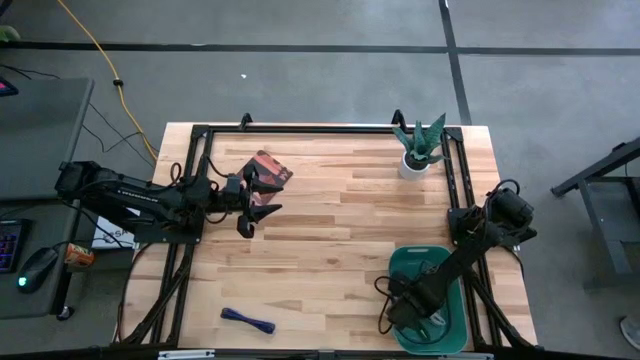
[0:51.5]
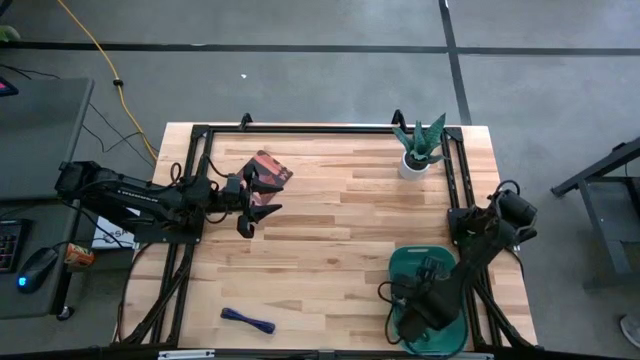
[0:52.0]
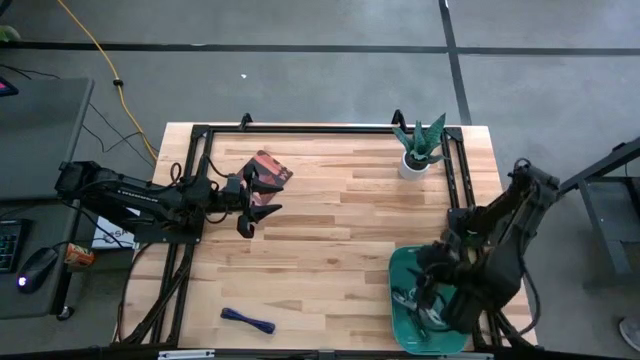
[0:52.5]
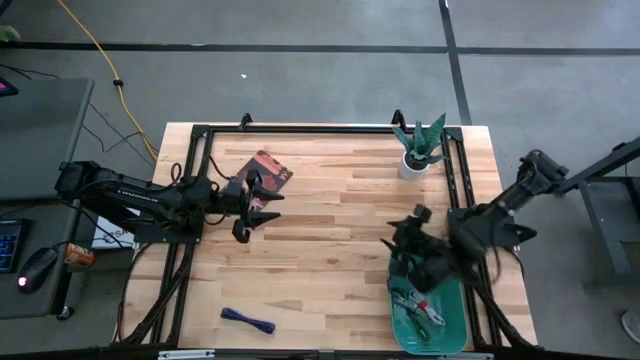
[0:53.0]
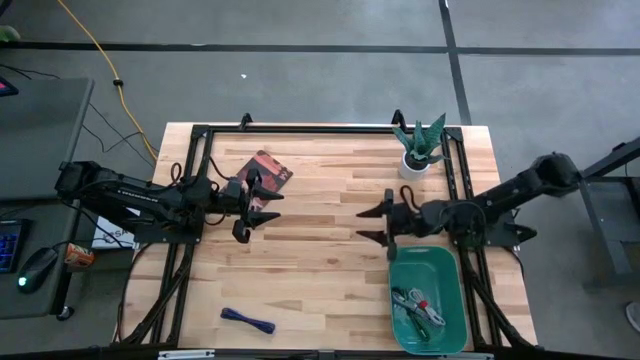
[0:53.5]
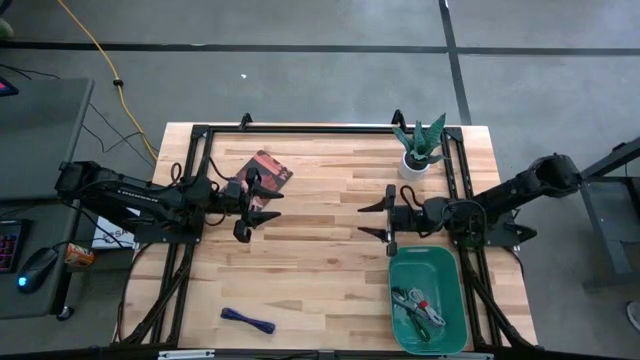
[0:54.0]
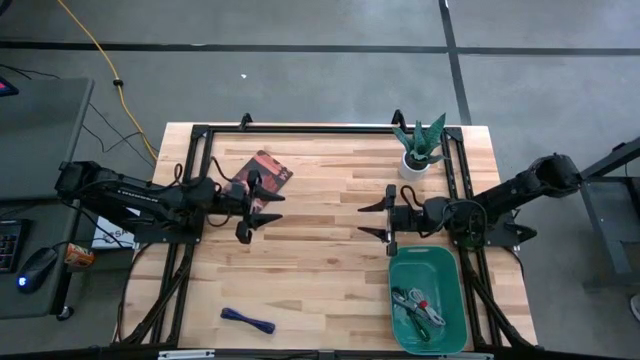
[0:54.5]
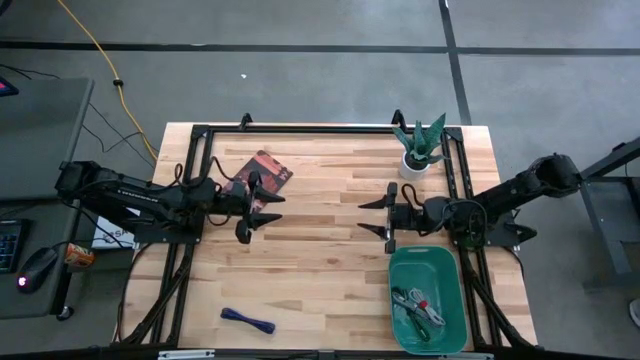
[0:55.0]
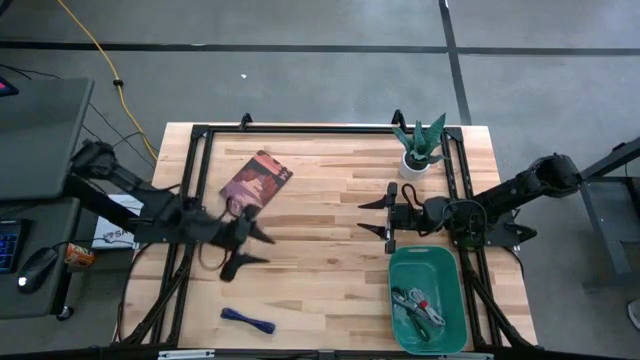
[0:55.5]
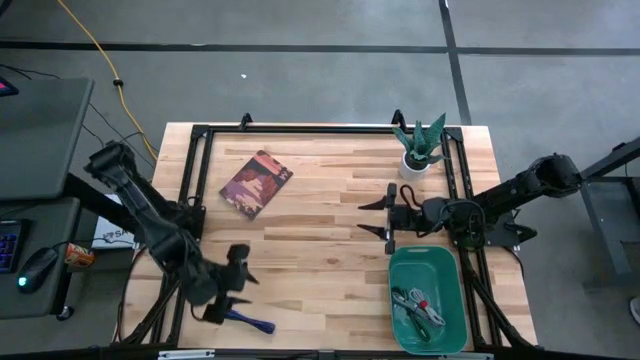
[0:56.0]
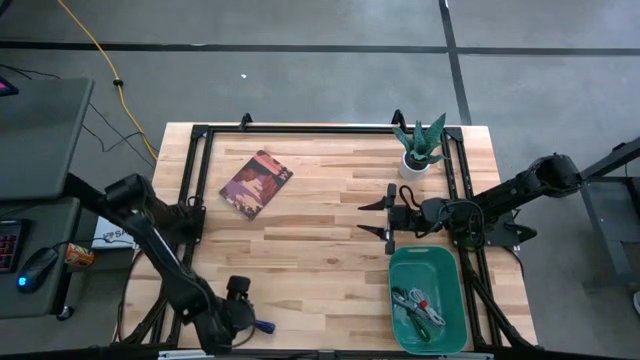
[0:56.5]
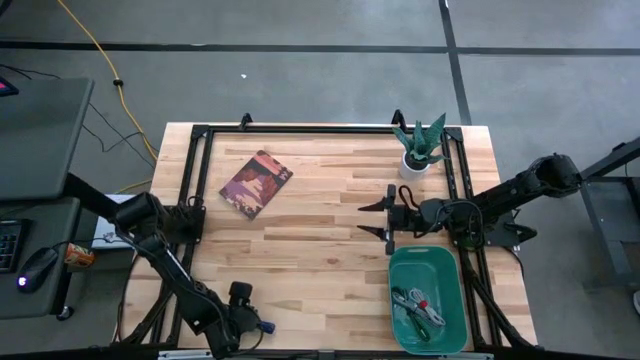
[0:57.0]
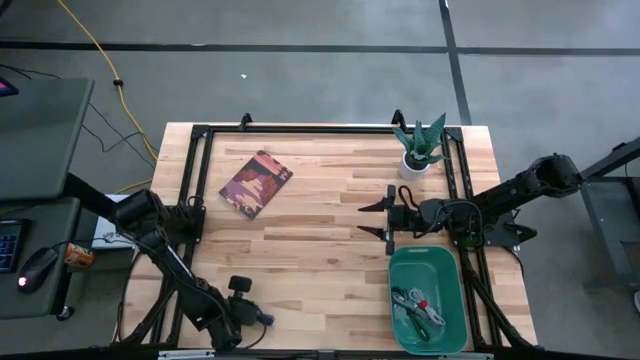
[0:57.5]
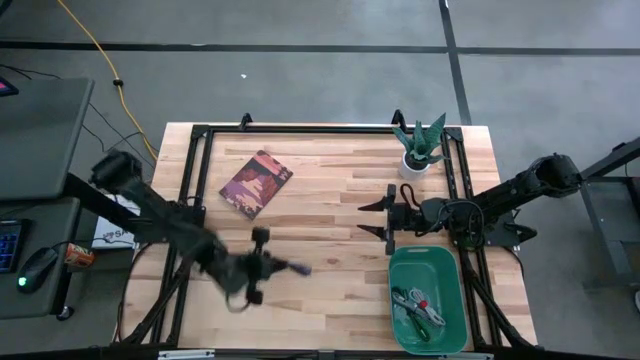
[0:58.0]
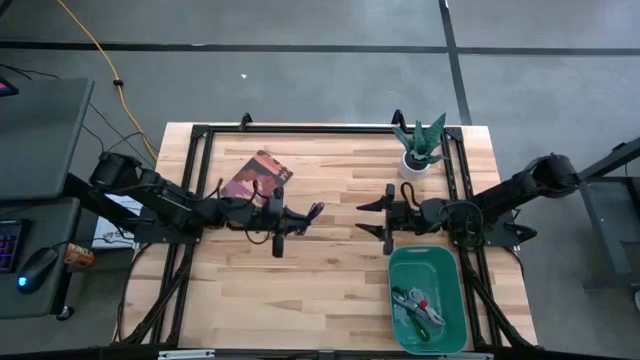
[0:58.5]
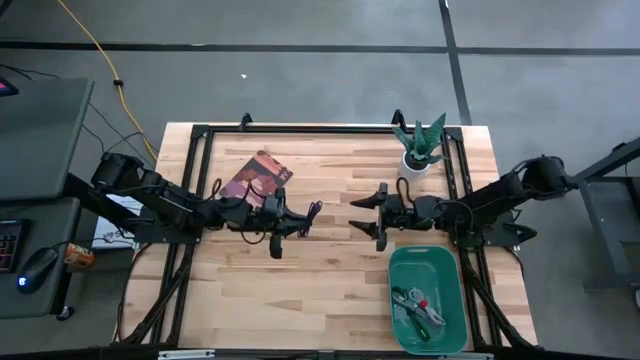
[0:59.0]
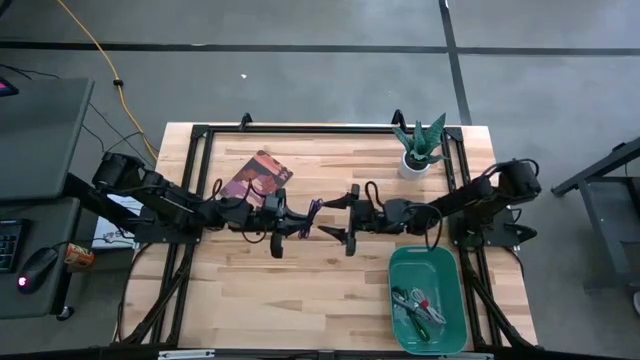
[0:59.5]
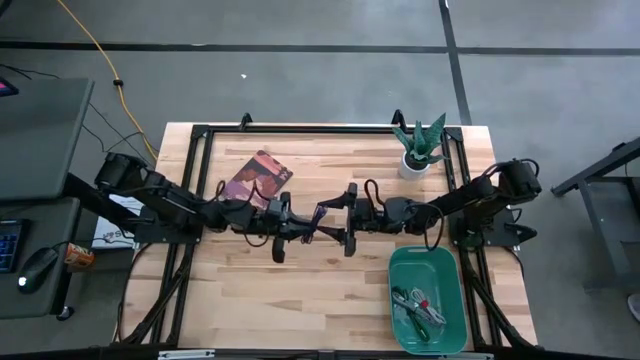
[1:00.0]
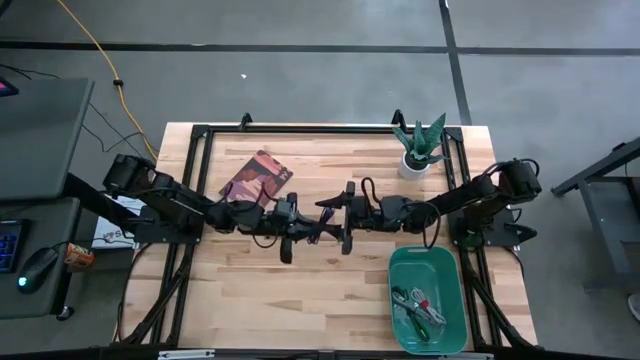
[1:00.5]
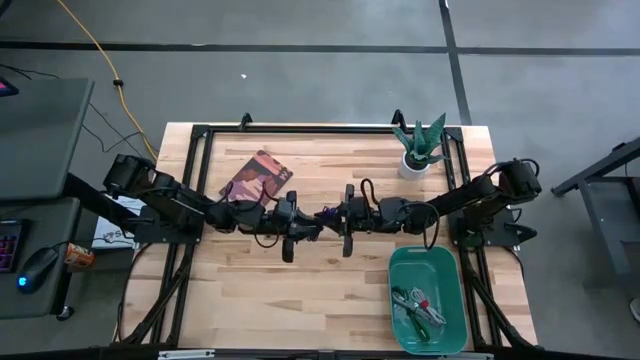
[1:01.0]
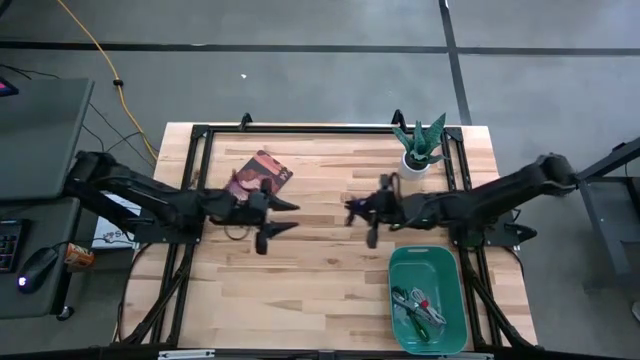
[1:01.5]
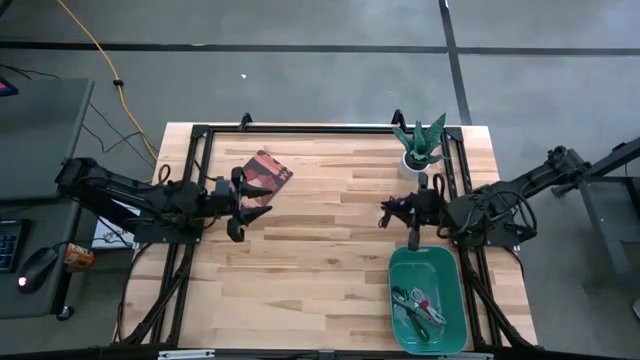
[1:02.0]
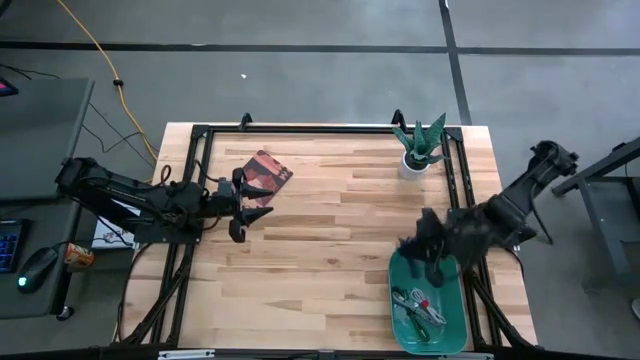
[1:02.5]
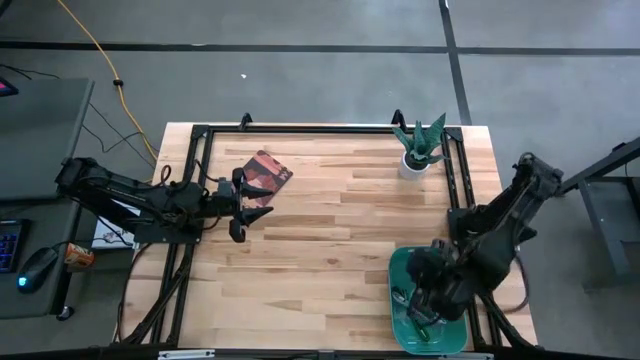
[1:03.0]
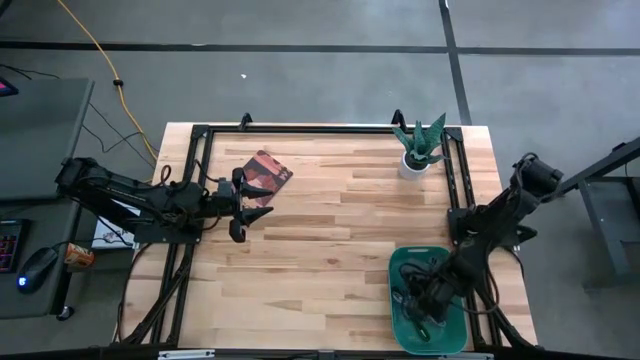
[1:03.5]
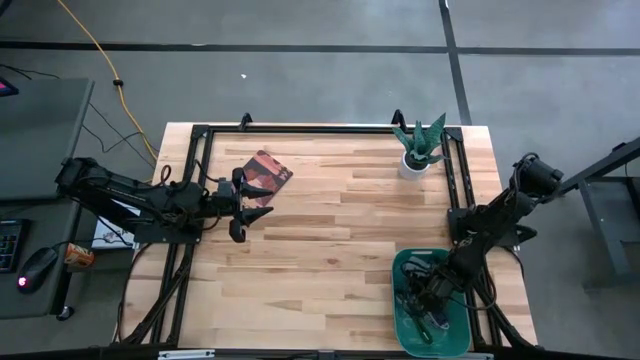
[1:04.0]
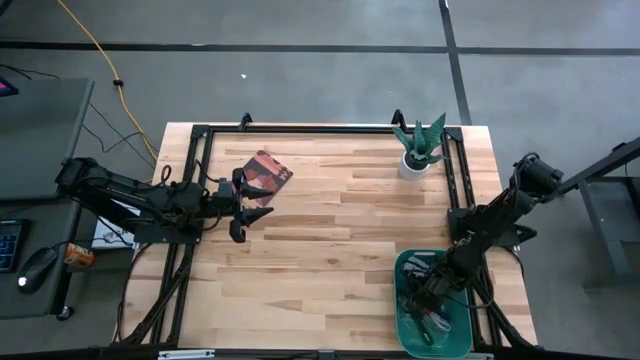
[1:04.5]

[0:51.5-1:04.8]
Task: Pick and place USB-C Cables
Put the black purple USB cable into the bin

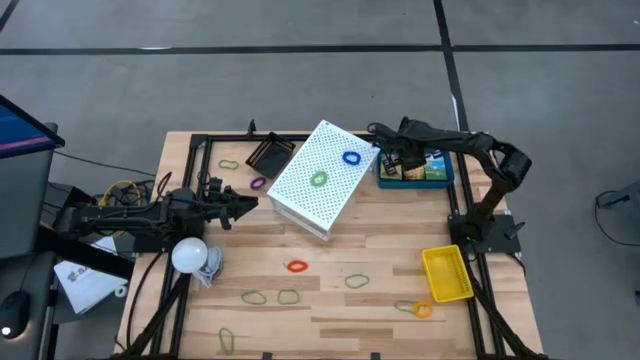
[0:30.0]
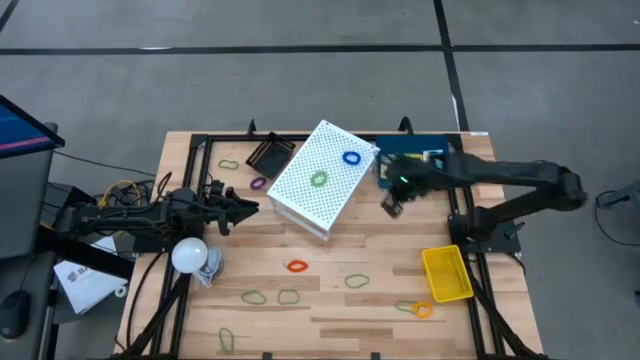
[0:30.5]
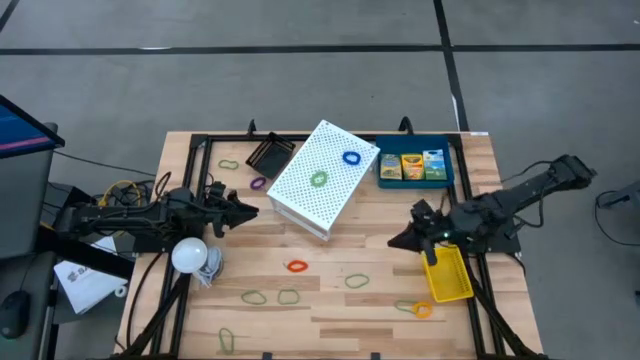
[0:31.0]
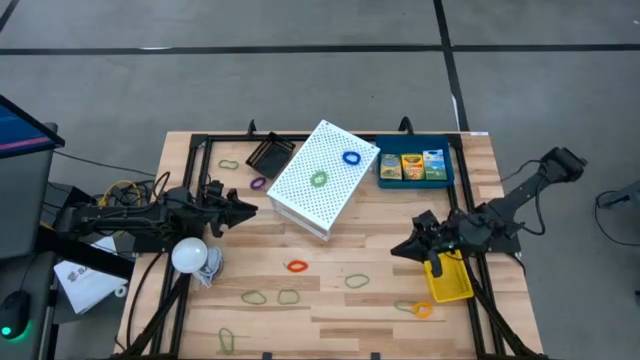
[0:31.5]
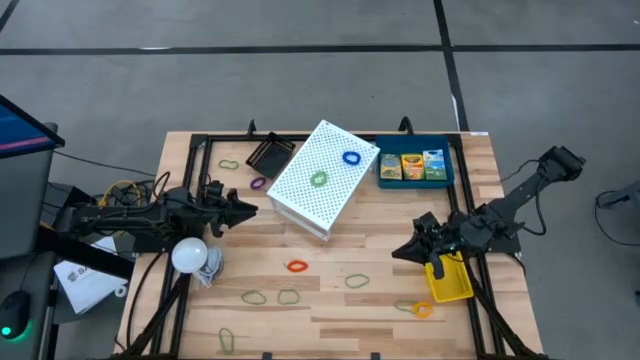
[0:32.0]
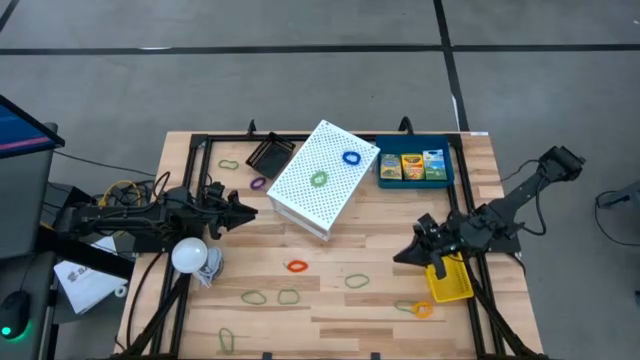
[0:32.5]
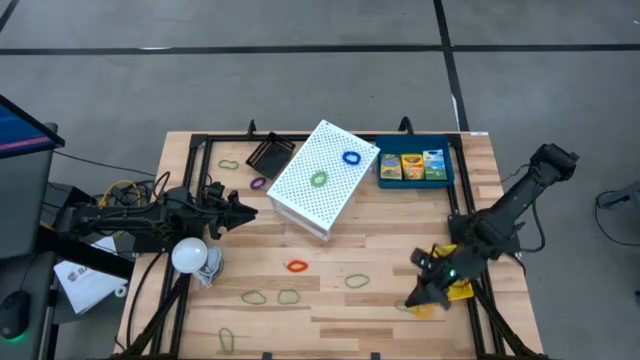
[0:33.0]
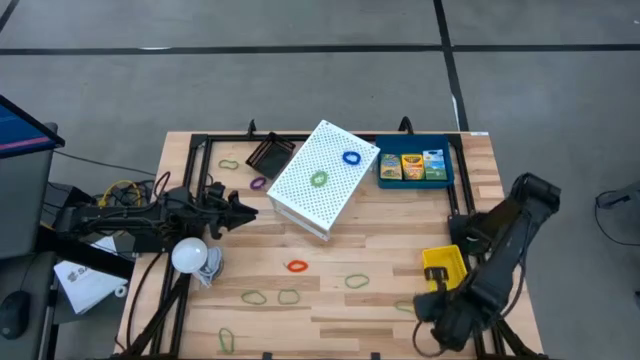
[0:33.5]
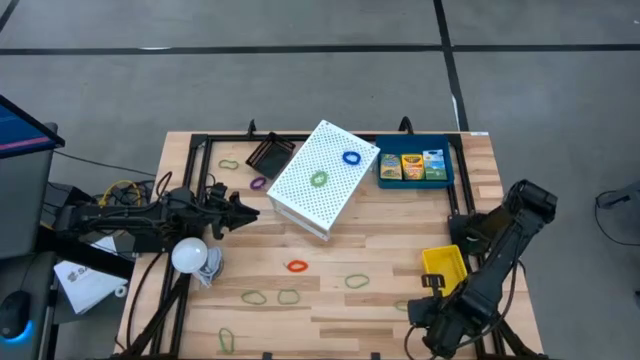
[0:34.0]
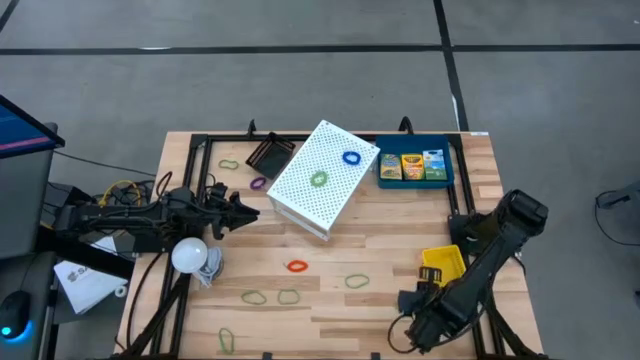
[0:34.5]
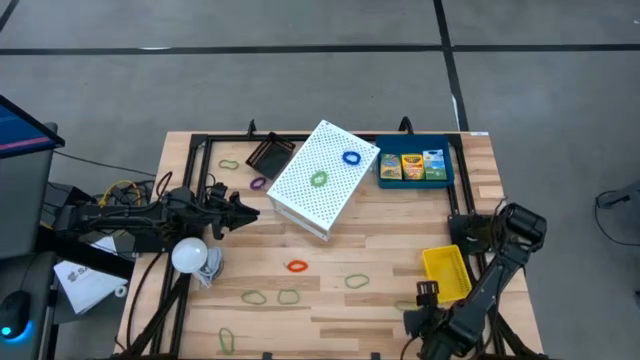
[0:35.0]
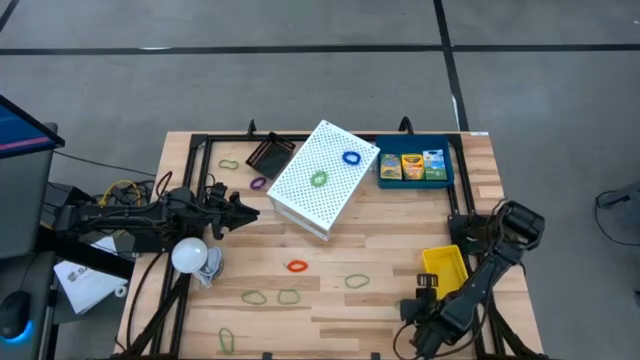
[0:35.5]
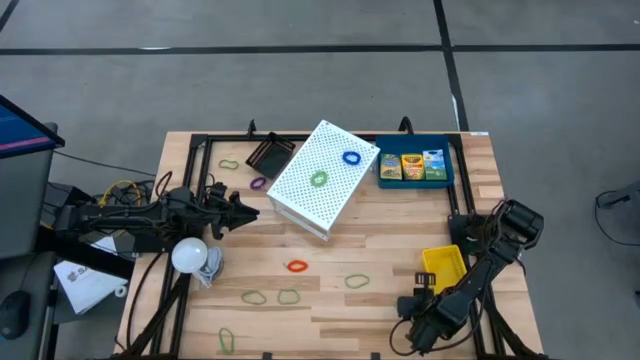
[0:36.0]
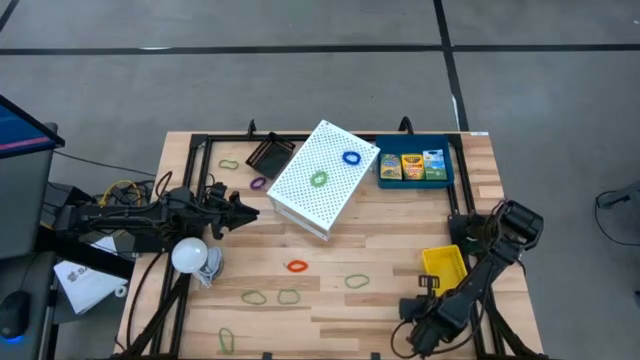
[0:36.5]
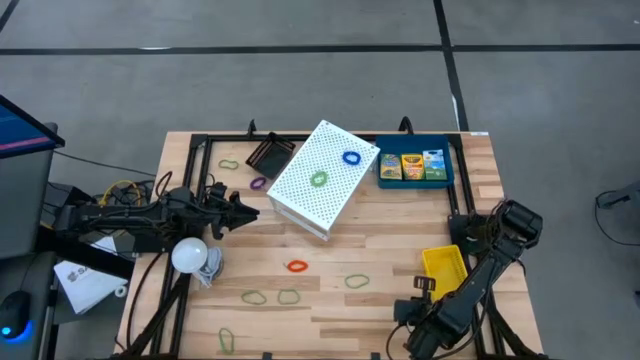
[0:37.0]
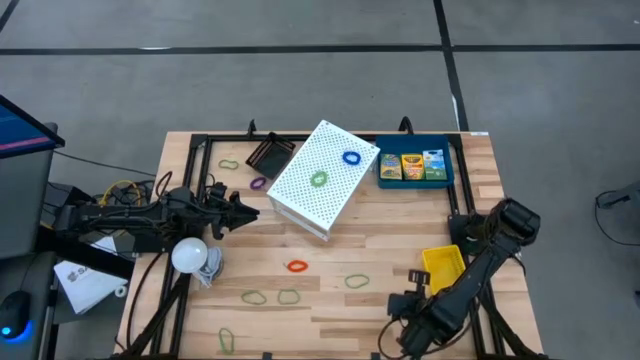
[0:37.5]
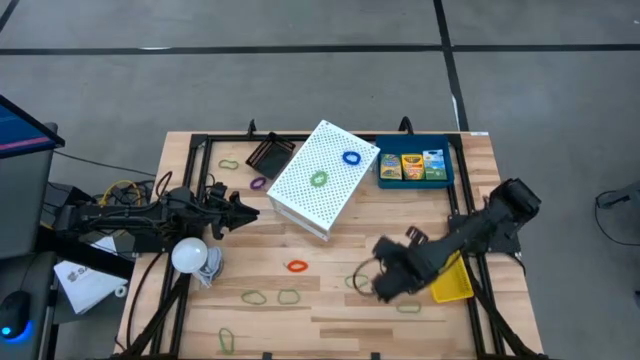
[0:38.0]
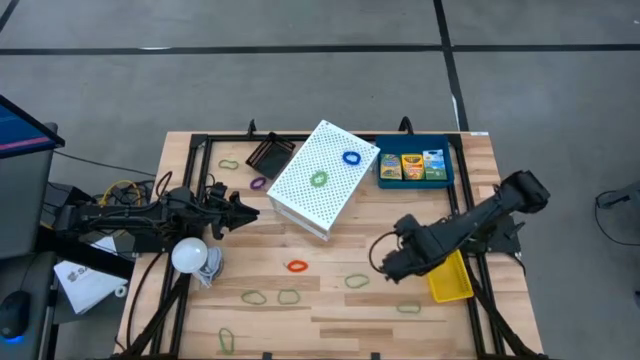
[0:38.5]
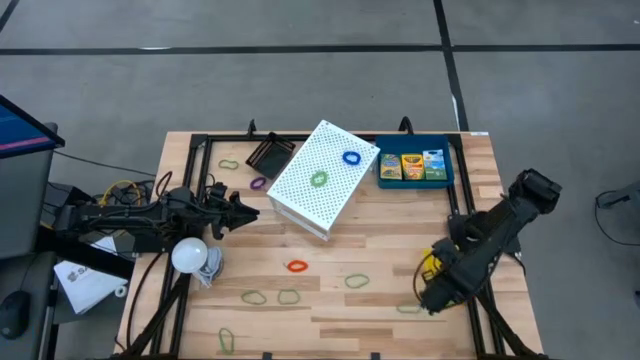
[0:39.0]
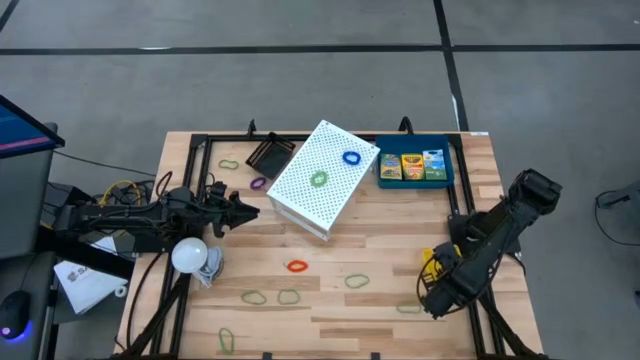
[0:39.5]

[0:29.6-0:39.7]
Task: Pick & Place Office Desk Supplies
Put the yellow spring keychain into the yellow bin
